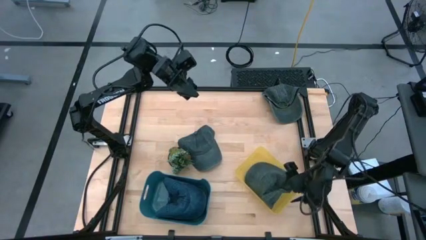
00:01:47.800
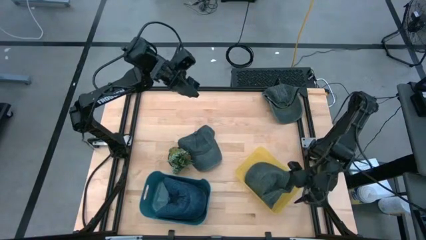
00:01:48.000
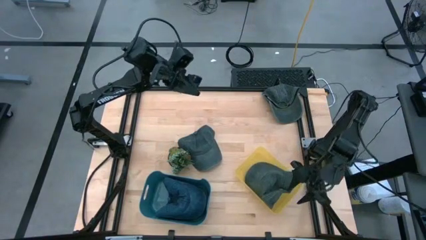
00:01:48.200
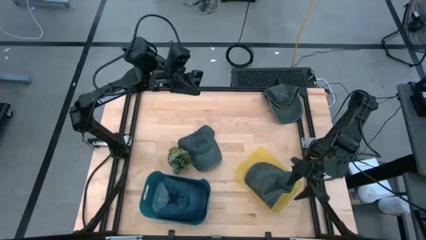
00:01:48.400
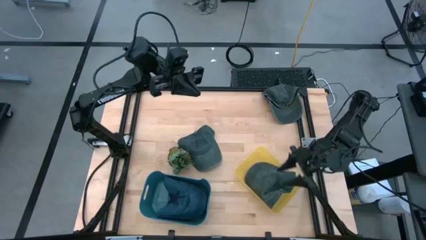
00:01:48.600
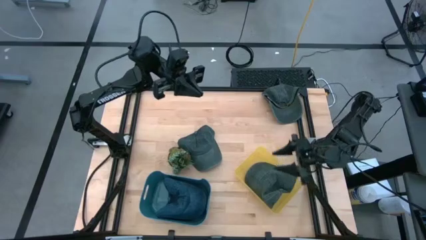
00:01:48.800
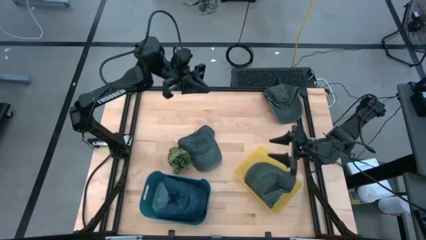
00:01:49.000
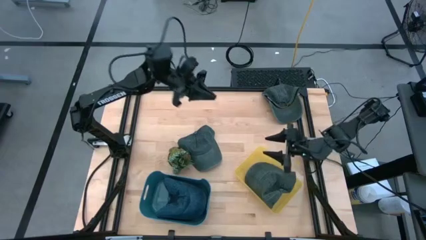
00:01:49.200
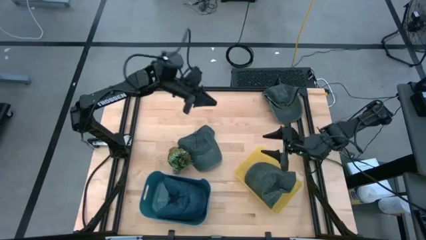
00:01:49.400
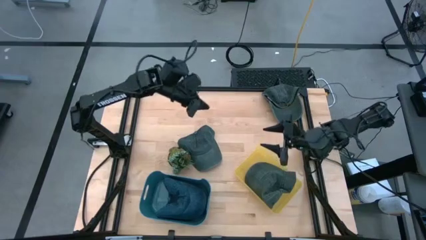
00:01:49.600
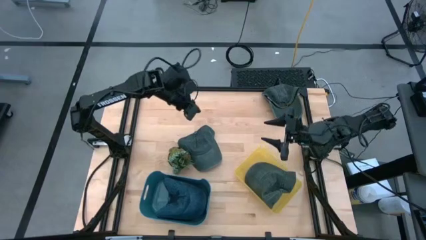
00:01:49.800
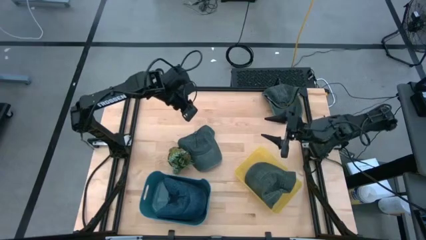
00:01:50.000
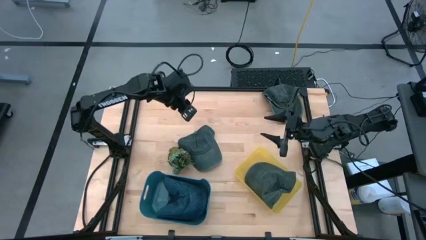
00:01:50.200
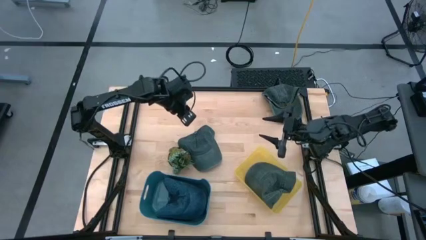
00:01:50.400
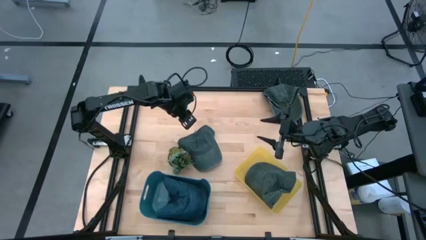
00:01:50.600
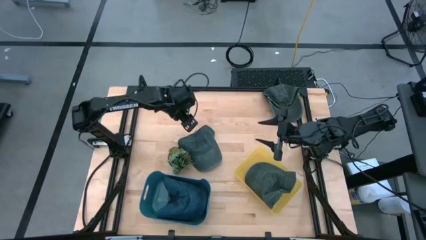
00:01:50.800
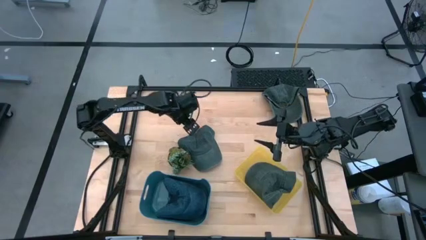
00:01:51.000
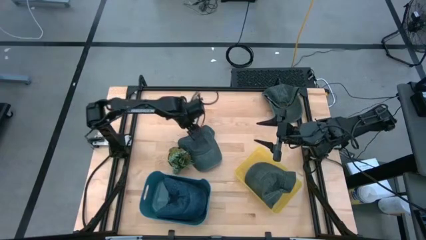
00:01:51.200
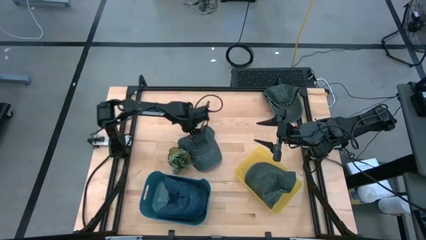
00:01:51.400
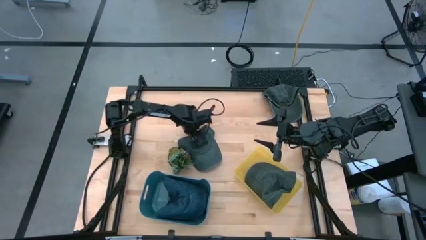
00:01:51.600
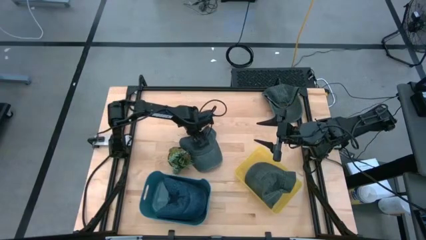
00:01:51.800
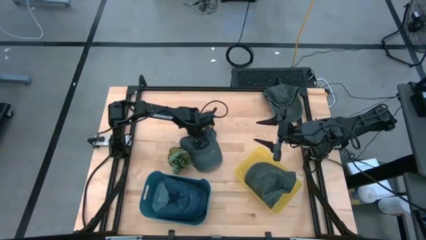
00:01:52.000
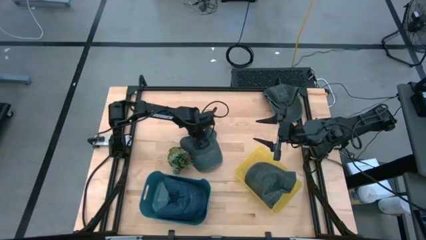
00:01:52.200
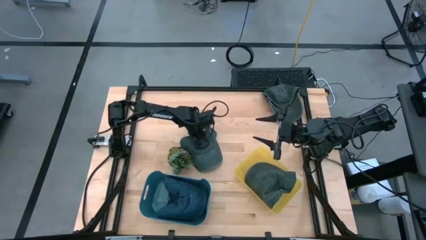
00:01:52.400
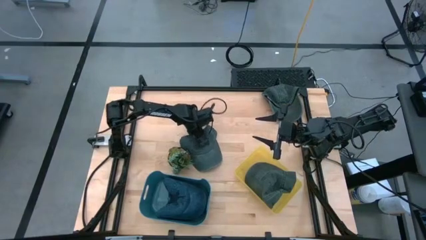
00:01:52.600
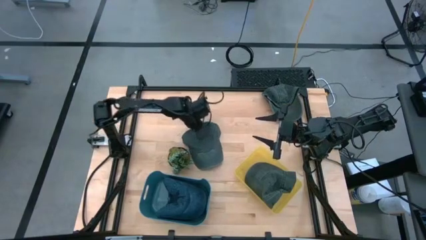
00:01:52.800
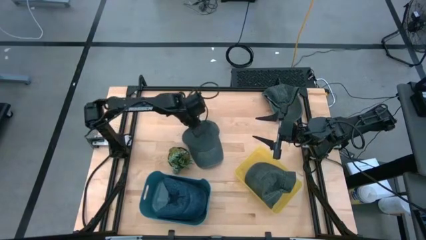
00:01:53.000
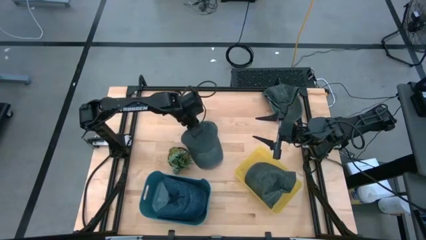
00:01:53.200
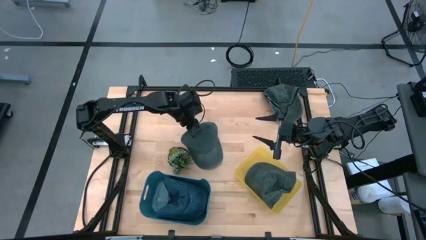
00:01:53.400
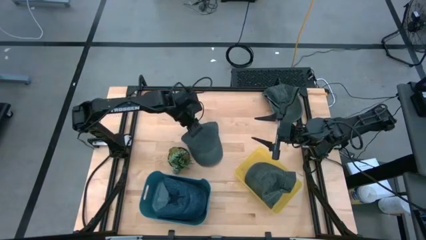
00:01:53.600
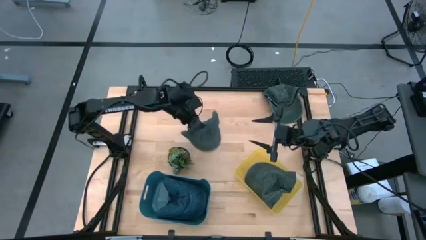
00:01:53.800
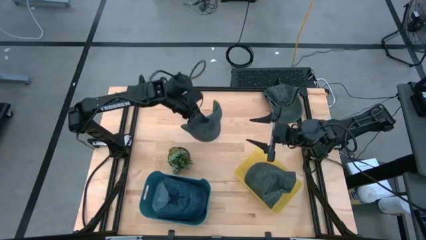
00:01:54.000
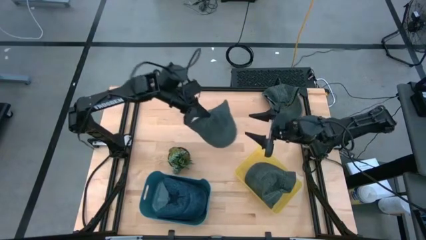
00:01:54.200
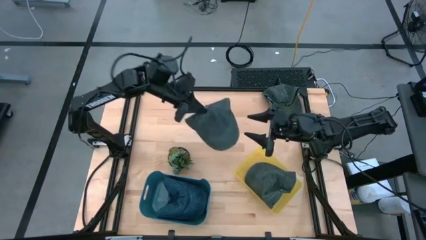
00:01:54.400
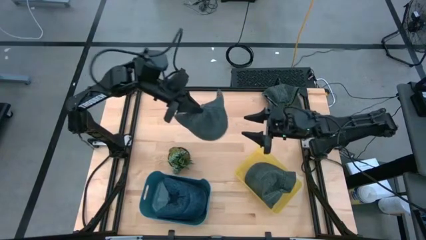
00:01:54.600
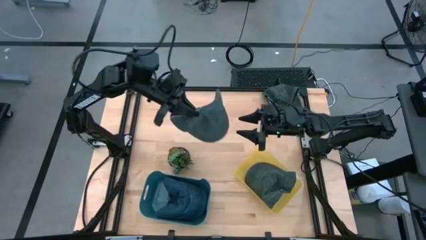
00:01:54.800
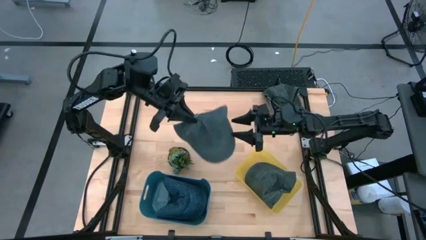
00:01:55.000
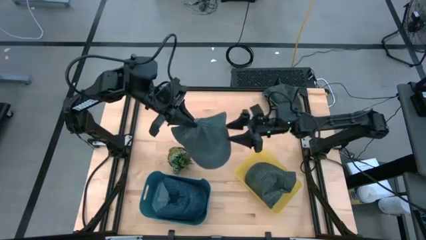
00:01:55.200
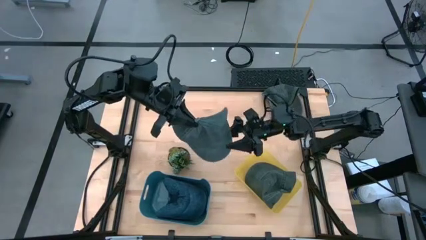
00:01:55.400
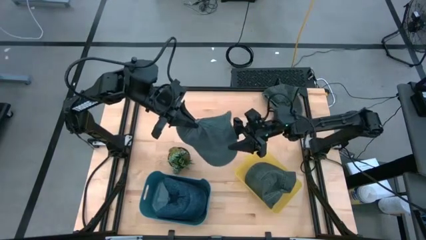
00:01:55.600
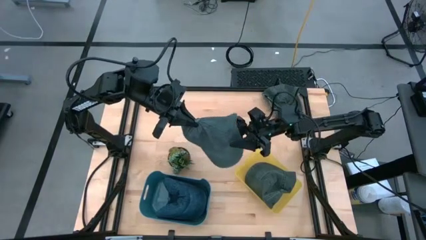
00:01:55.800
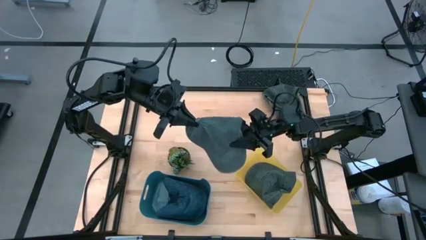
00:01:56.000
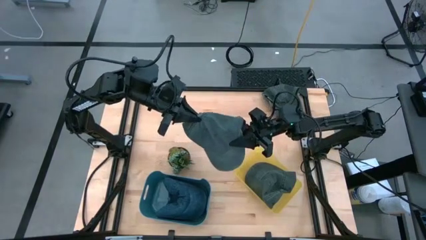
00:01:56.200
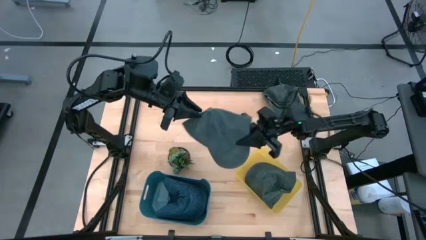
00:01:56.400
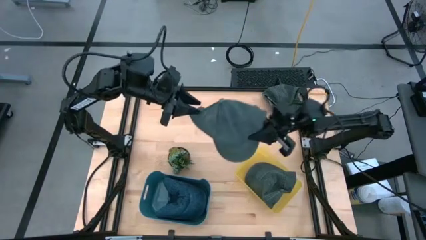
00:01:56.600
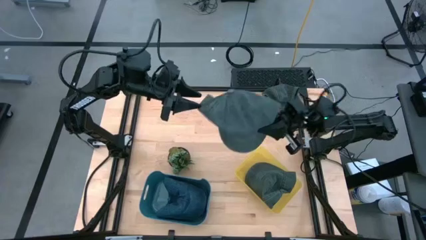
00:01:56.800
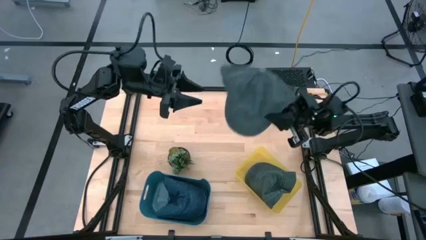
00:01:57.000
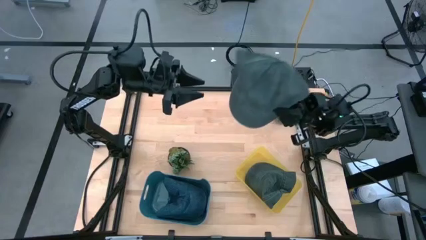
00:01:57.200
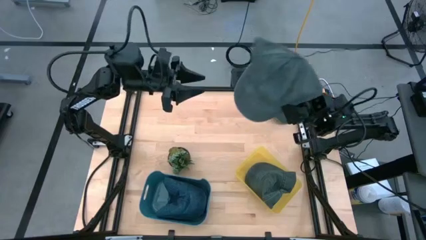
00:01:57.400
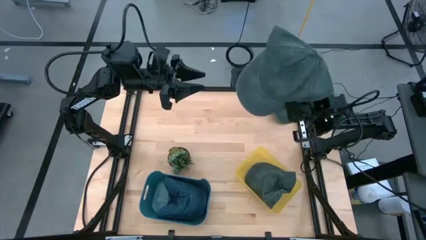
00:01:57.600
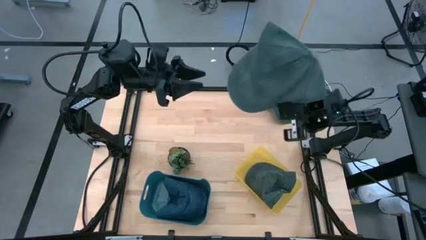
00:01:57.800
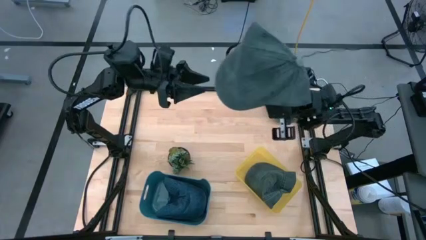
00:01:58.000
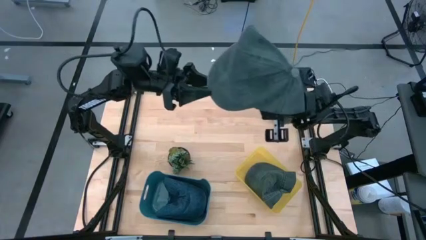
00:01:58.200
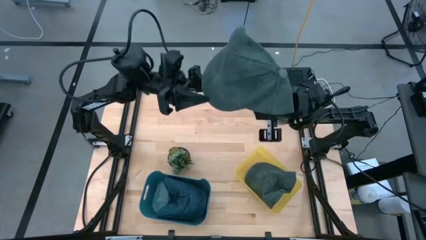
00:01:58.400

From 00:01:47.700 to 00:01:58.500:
Task: Pick & Place hat
Put the bottom black cap into the yellow bin

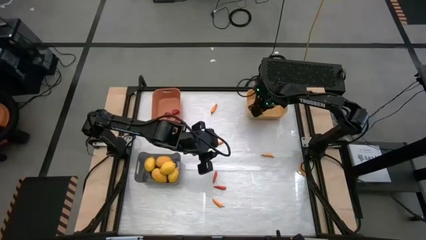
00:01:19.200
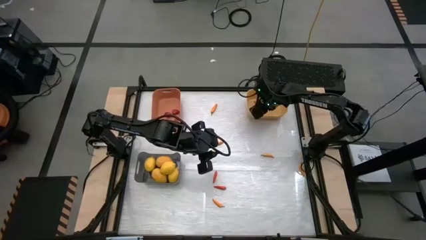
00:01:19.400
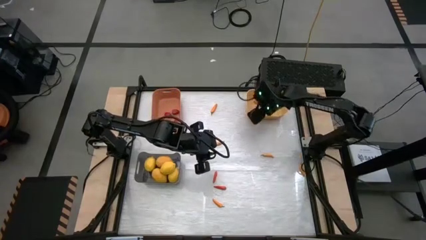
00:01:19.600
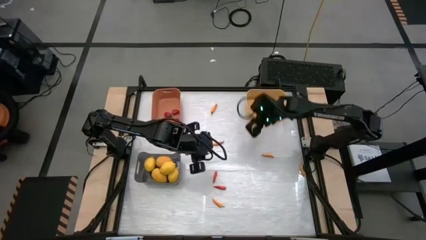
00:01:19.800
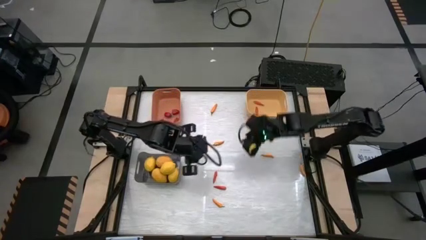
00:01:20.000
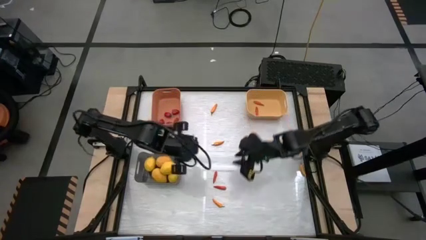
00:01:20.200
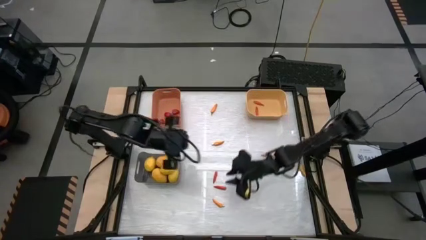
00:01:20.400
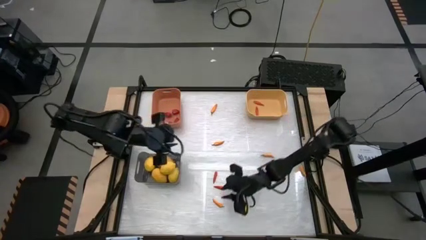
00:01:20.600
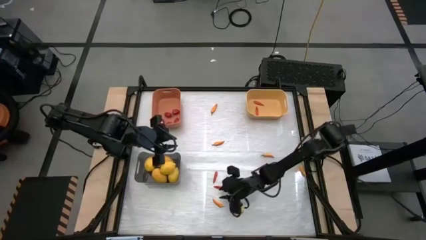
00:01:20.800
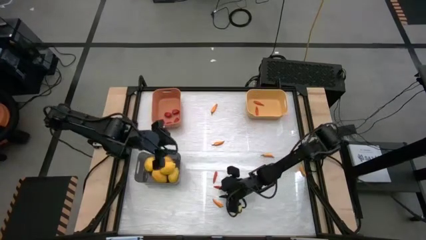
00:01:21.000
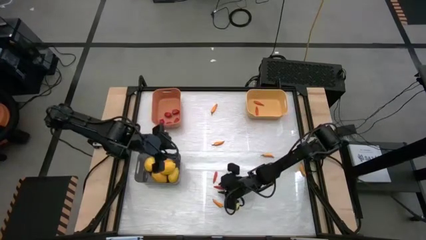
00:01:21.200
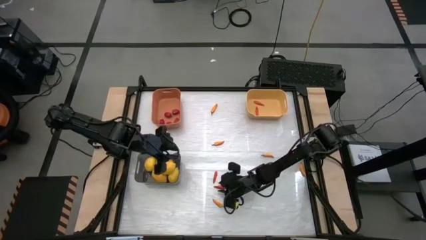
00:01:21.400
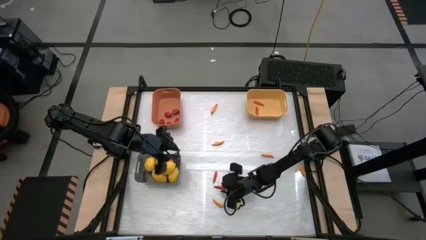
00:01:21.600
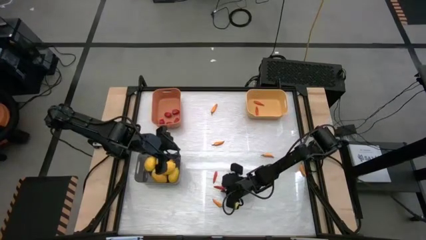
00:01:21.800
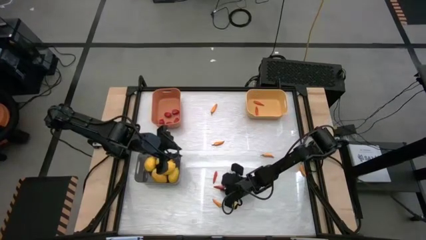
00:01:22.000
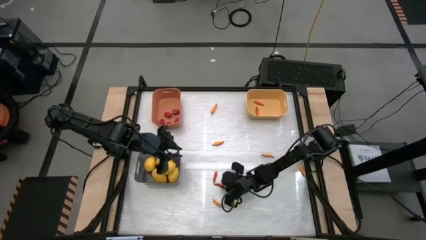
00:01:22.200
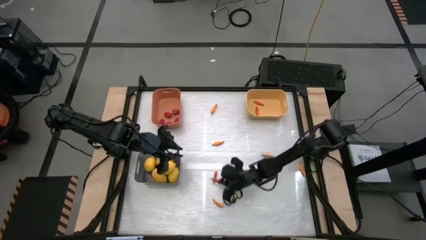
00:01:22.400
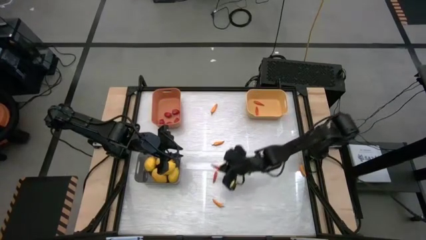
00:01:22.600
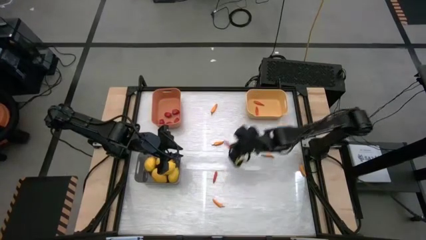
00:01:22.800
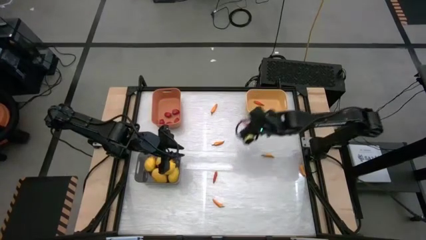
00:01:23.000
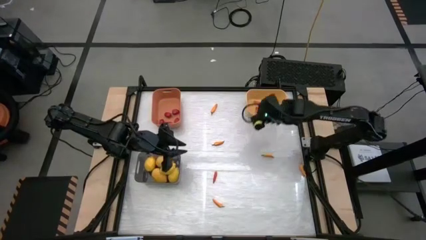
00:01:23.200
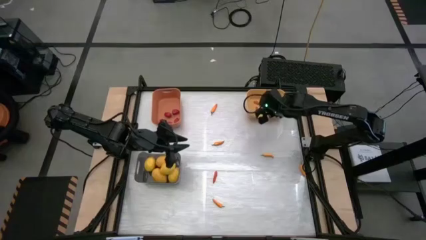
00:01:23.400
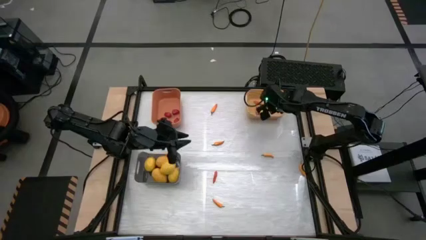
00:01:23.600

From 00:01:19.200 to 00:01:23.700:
Task: Sort produce into baskets
Put the orange chili pepper into the yellow bin
